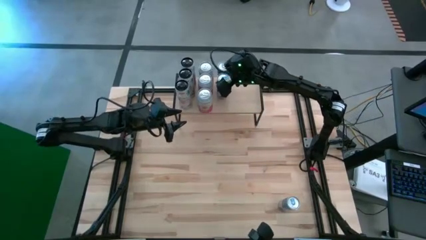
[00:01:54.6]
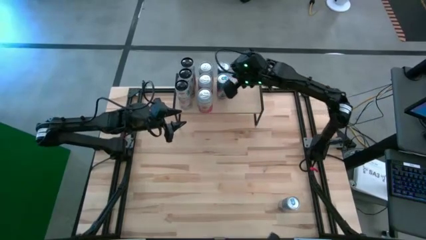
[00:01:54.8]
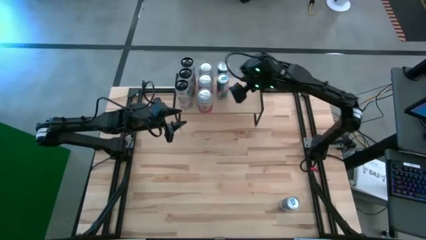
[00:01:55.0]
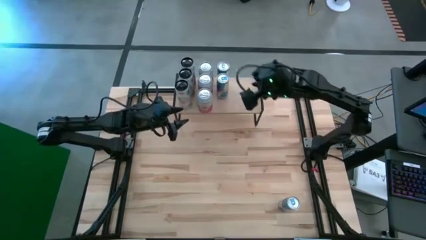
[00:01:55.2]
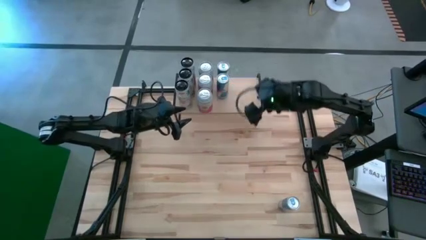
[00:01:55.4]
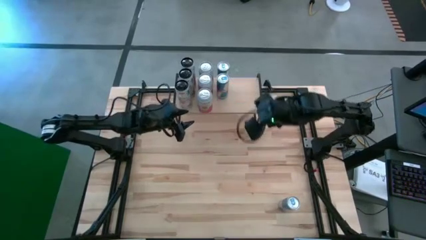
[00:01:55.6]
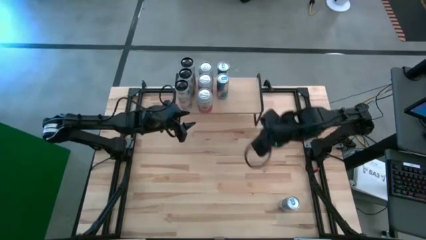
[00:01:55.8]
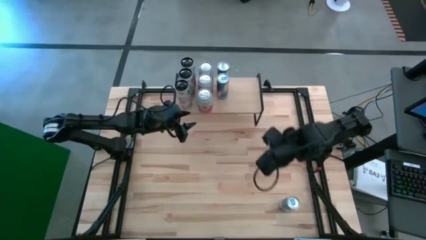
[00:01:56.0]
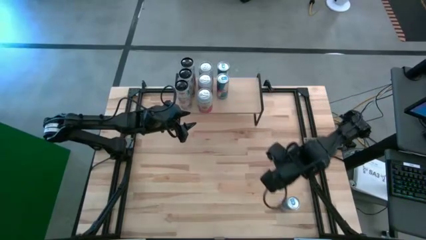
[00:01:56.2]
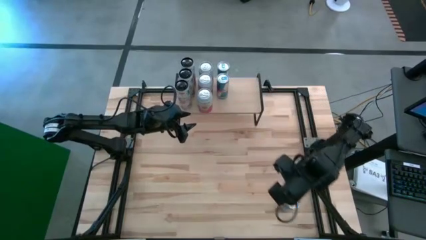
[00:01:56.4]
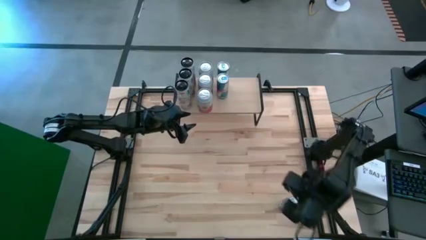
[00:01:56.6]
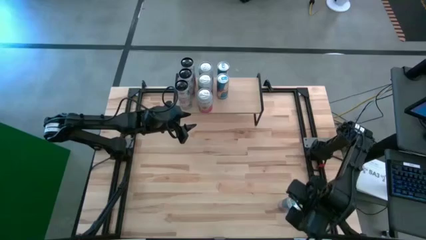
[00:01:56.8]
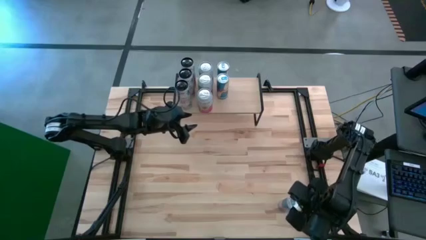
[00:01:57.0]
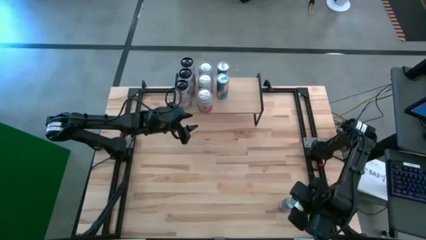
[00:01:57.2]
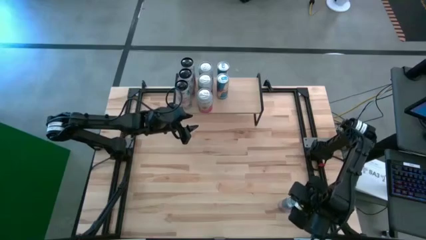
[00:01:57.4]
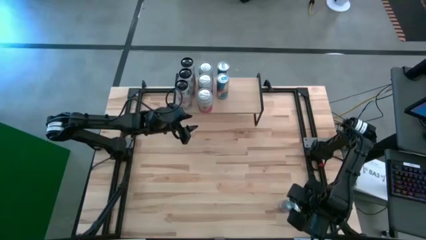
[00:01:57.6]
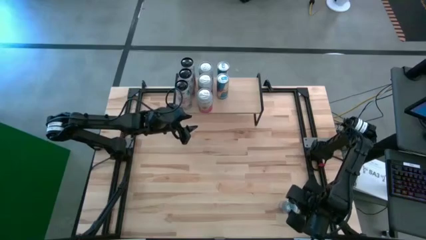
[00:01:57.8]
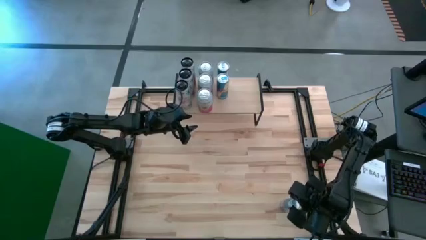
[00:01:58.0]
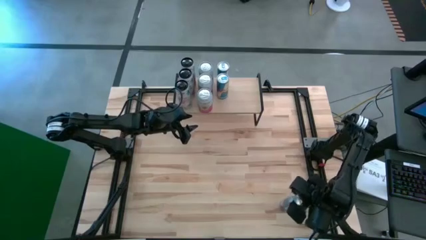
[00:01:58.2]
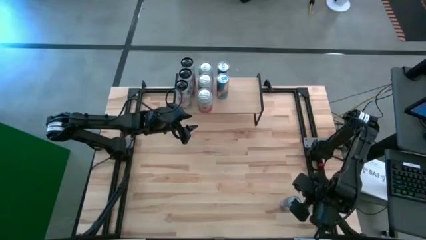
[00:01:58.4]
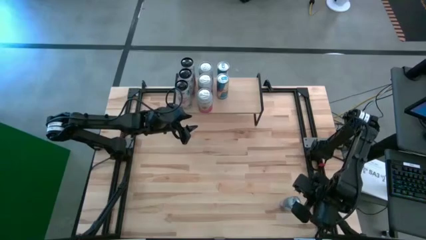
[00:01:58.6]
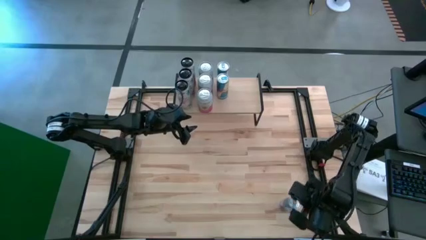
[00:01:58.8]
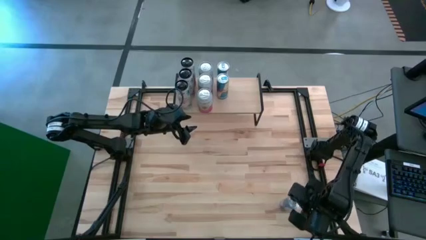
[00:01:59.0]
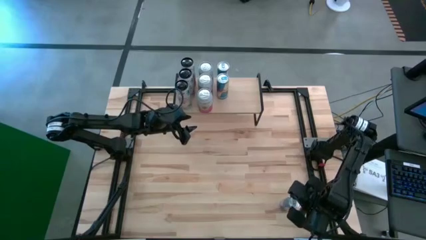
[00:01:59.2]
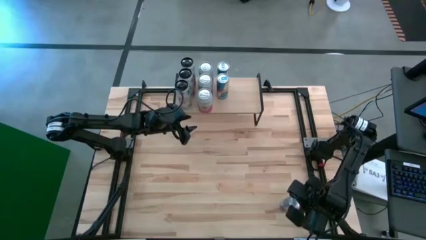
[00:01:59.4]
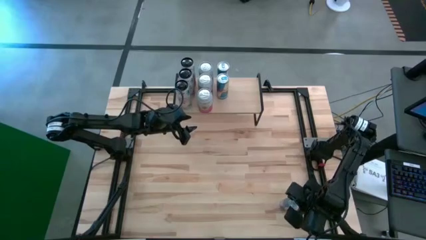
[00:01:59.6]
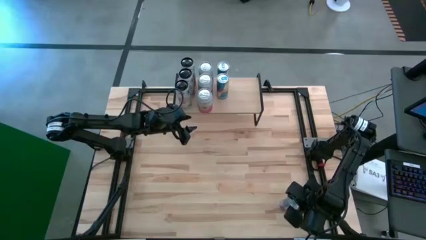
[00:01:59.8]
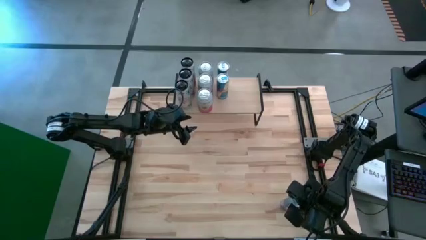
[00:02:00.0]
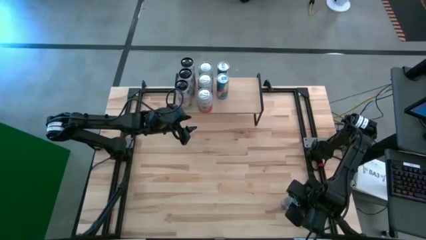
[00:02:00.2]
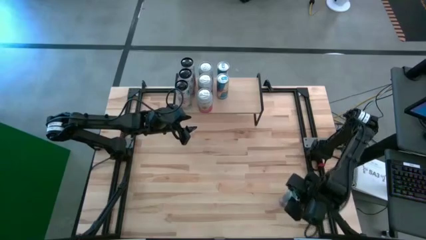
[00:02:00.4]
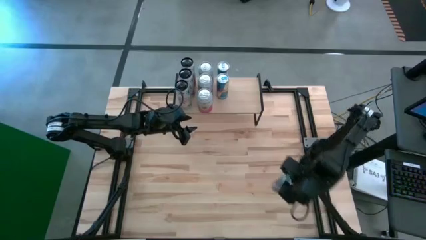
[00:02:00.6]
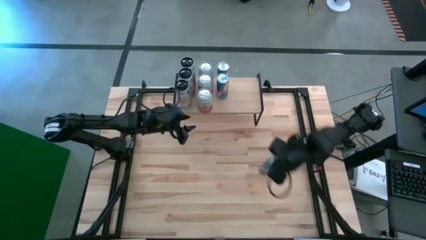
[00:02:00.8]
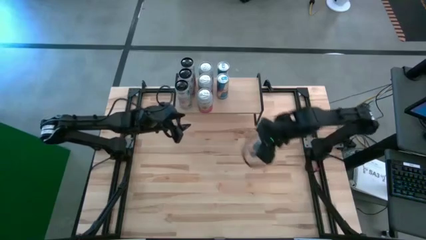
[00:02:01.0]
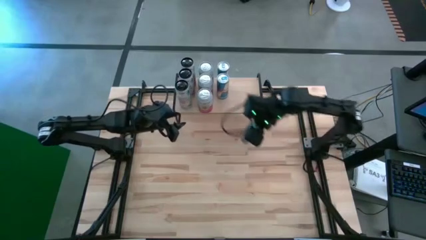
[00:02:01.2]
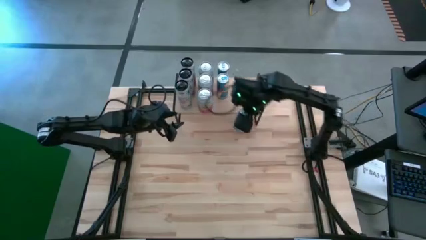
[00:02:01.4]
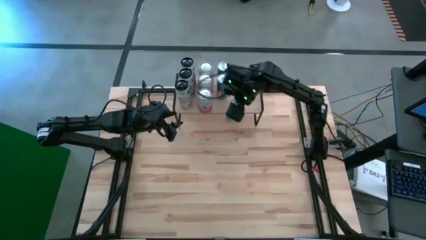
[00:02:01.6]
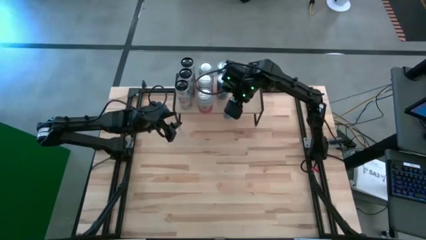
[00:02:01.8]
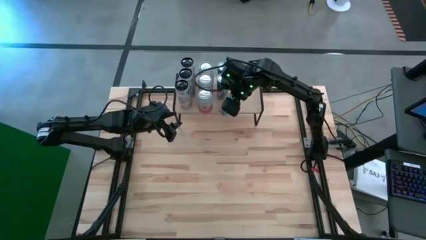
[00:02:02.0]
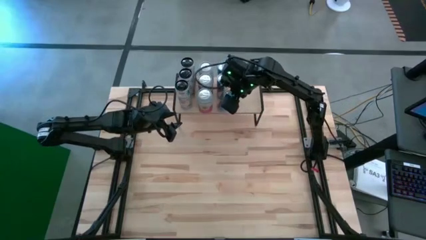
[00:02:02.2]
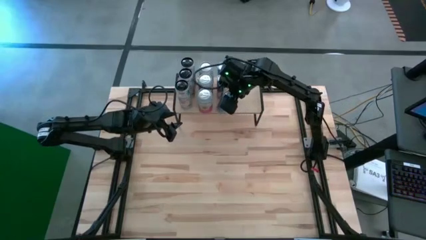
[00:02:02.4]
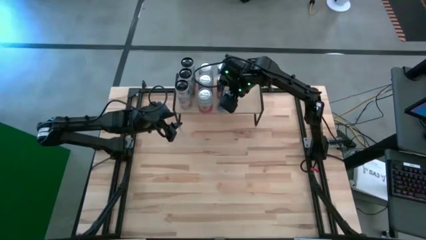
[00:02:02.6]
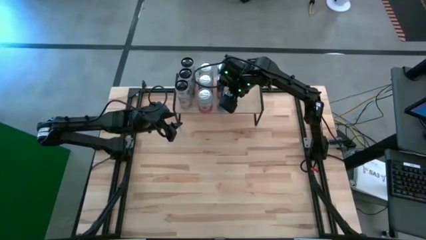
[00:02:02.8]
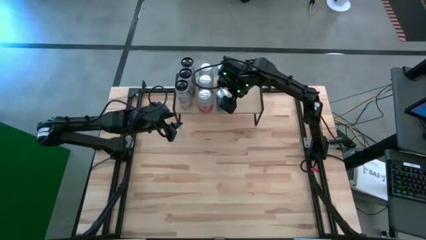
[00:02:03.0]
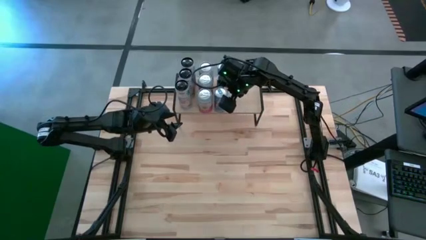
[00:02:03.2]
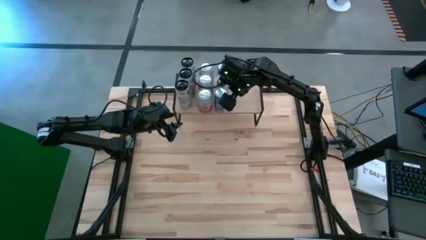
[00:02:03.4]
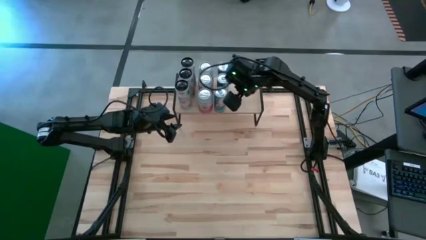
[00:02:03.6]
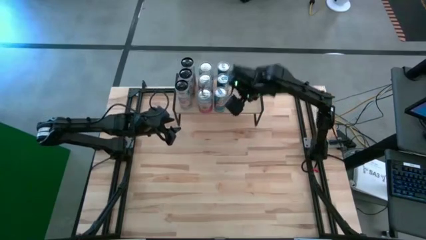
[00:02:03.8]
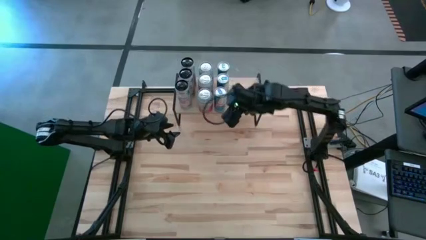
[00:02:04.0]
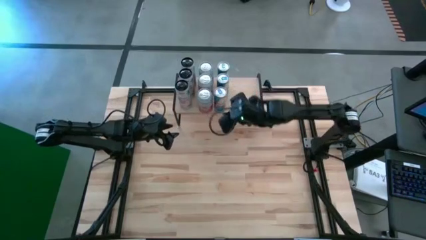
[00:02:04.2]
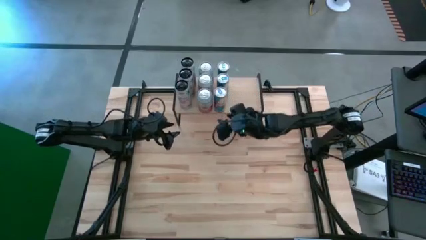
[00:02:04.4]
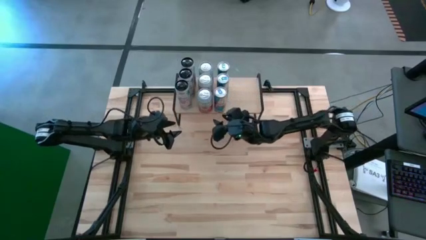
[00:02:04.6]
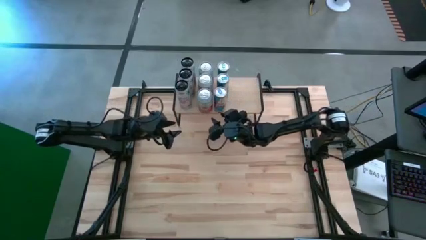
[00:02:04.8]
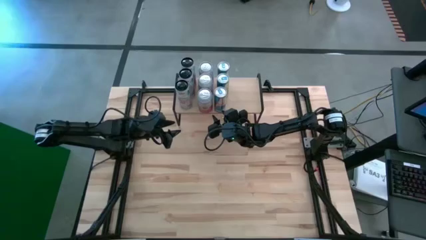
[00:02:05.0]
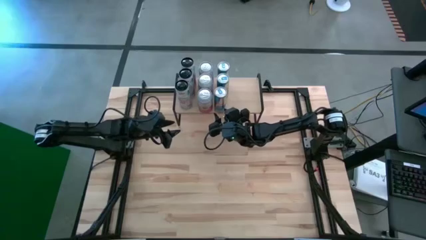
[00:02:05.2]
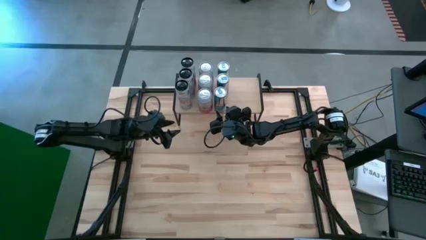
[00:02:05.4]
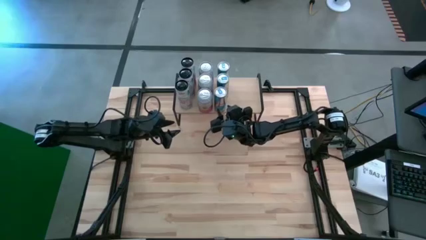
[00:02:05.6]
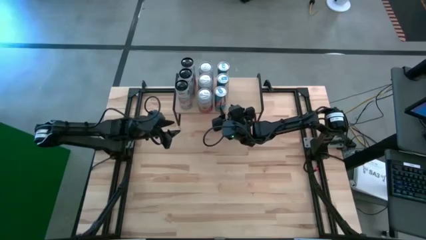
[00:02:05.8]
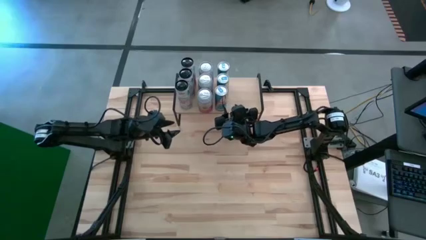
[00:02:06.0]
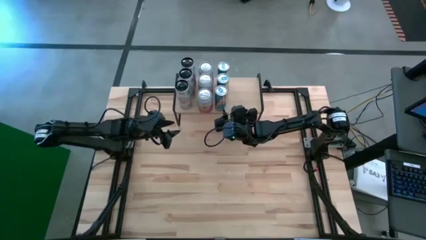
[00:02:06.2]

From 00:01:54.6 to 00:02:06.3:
Task: Place canned beverage on shelf
Put the blue soda can on the shelf aligned with the other blue soda cans
